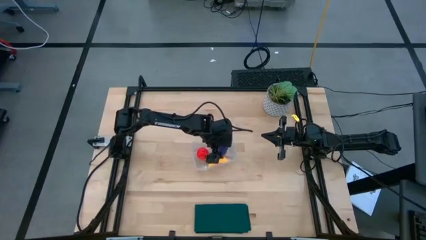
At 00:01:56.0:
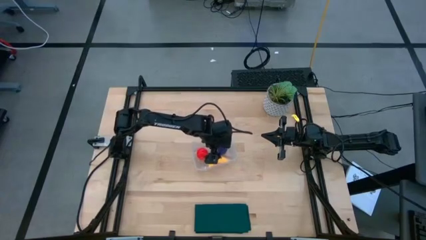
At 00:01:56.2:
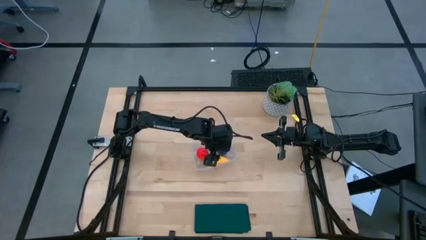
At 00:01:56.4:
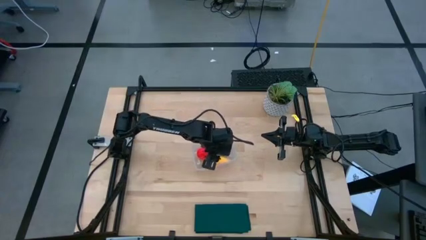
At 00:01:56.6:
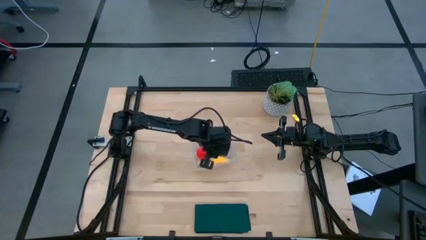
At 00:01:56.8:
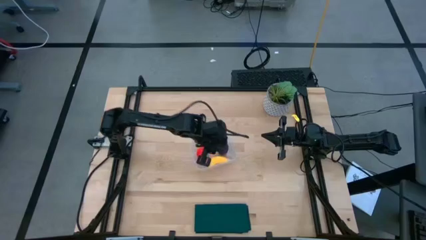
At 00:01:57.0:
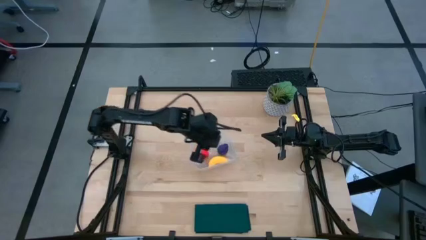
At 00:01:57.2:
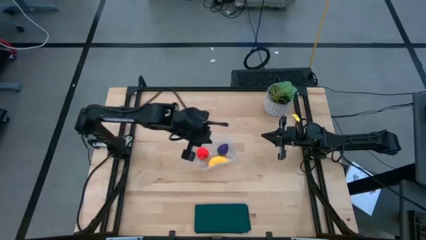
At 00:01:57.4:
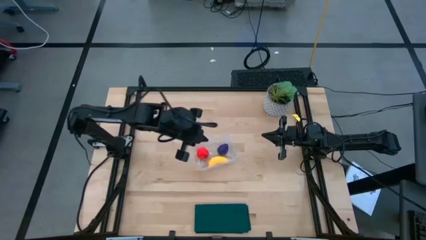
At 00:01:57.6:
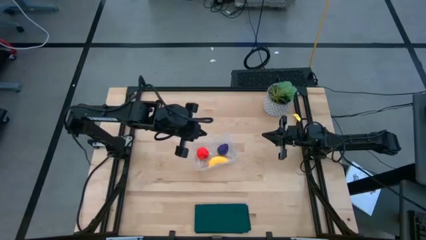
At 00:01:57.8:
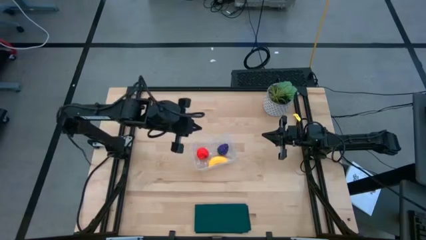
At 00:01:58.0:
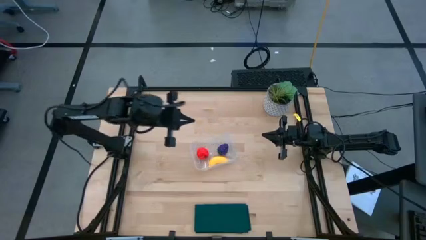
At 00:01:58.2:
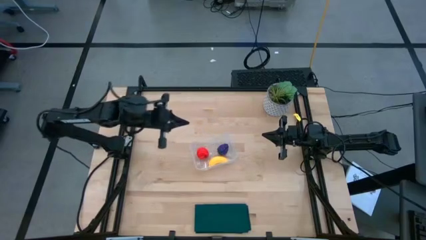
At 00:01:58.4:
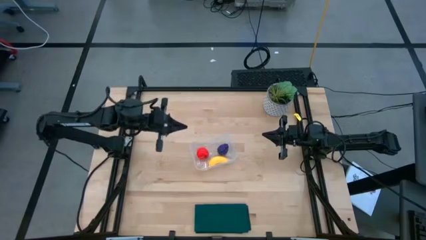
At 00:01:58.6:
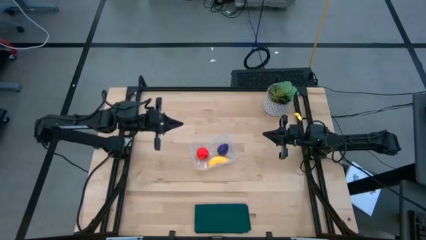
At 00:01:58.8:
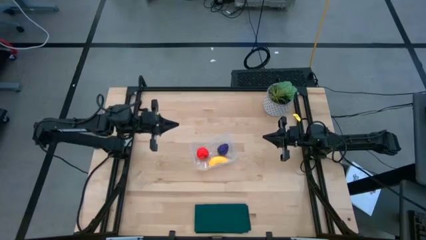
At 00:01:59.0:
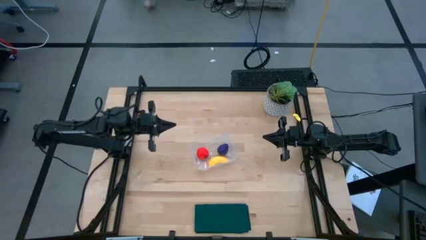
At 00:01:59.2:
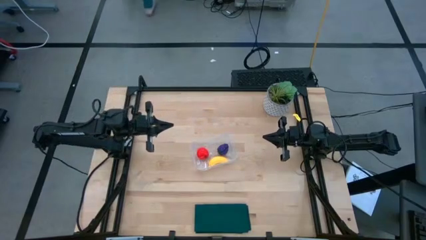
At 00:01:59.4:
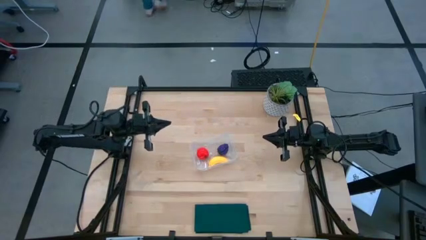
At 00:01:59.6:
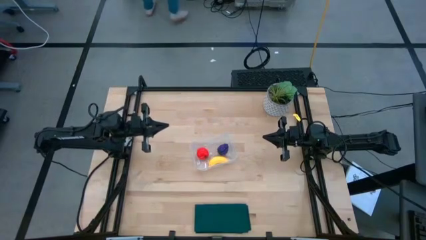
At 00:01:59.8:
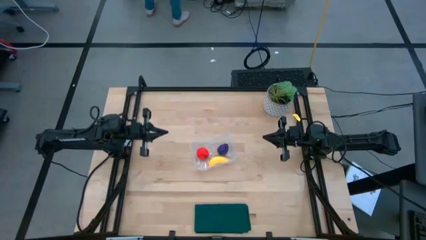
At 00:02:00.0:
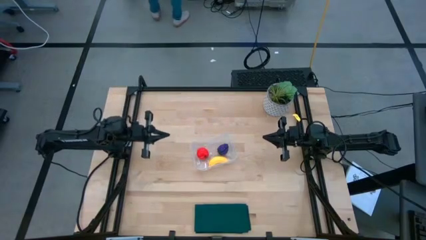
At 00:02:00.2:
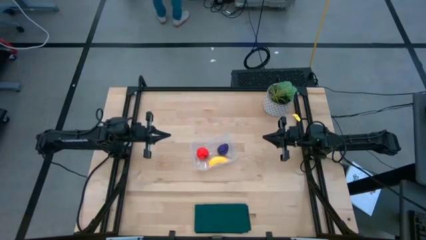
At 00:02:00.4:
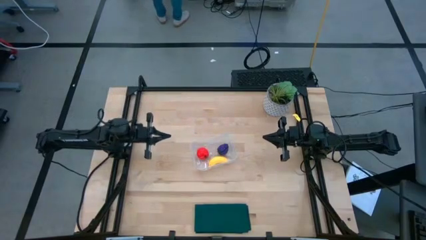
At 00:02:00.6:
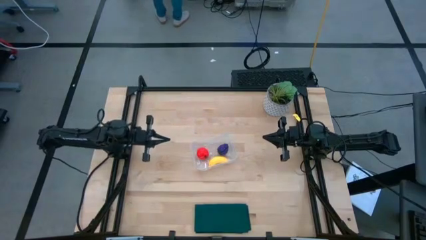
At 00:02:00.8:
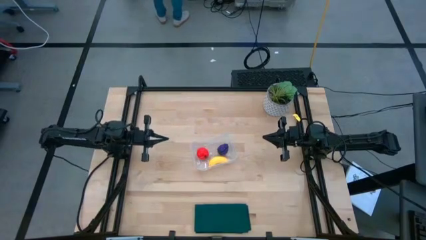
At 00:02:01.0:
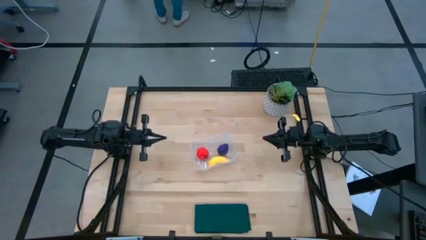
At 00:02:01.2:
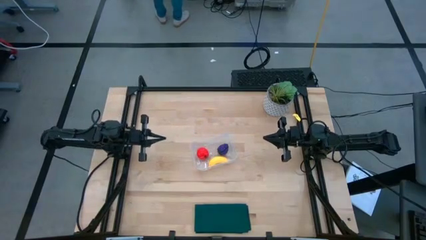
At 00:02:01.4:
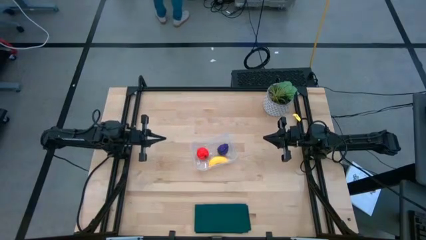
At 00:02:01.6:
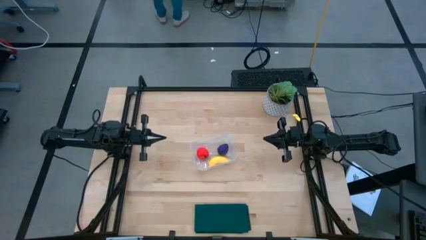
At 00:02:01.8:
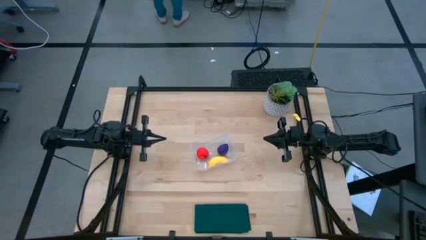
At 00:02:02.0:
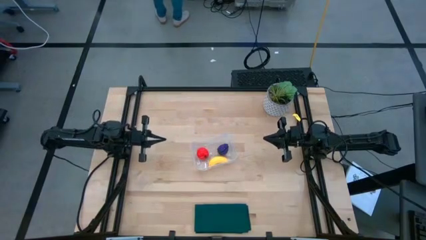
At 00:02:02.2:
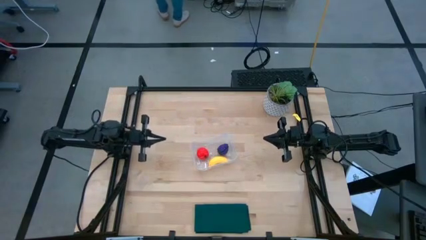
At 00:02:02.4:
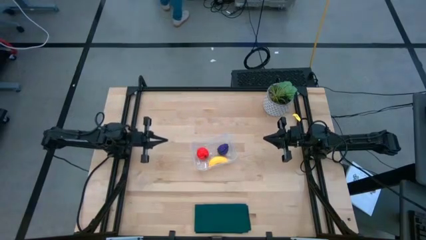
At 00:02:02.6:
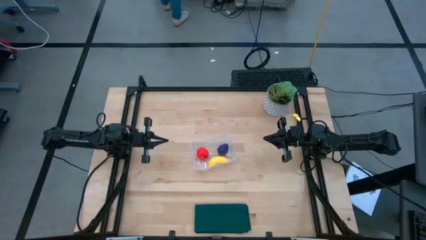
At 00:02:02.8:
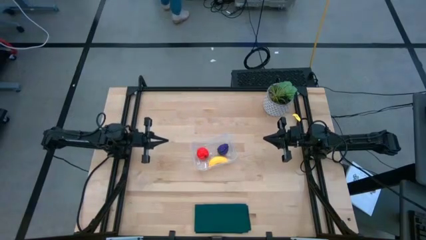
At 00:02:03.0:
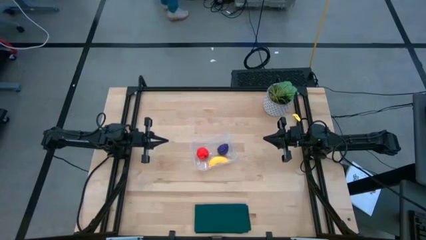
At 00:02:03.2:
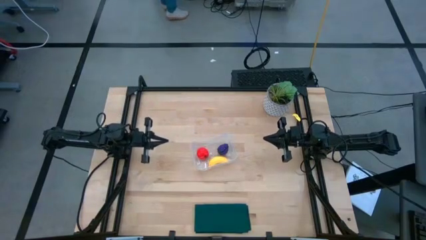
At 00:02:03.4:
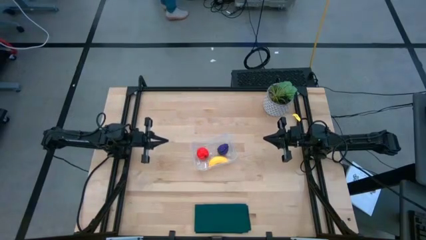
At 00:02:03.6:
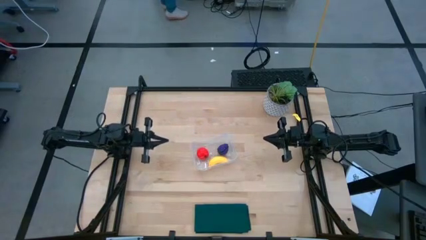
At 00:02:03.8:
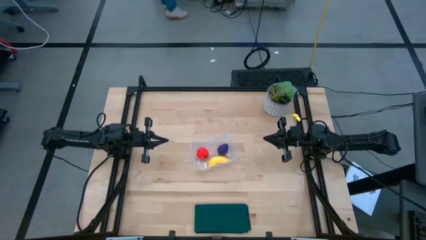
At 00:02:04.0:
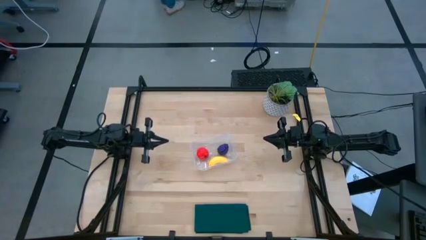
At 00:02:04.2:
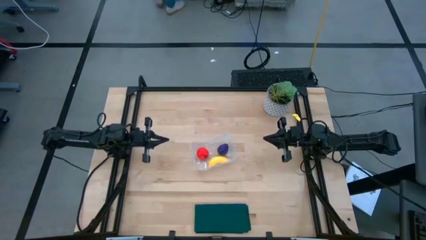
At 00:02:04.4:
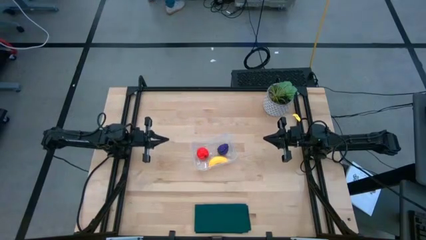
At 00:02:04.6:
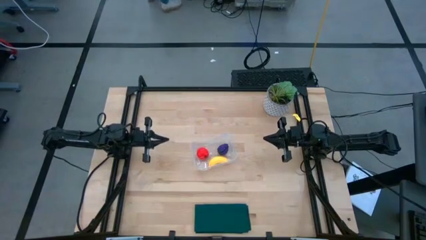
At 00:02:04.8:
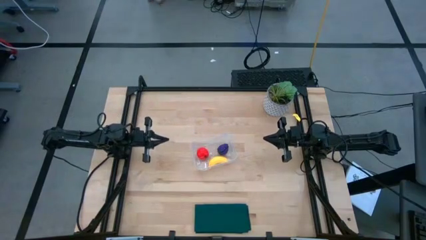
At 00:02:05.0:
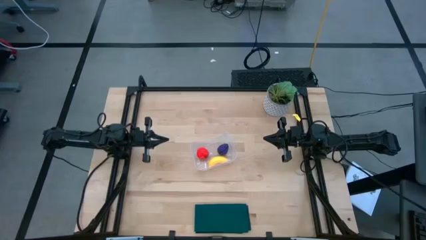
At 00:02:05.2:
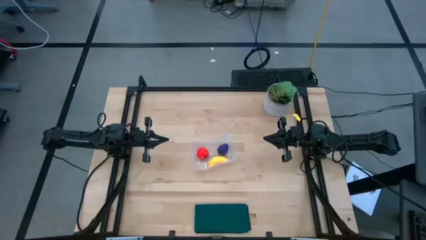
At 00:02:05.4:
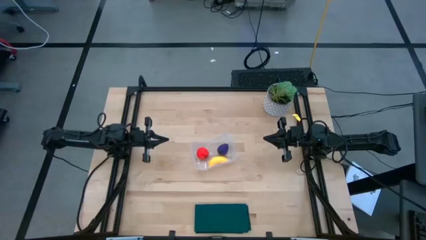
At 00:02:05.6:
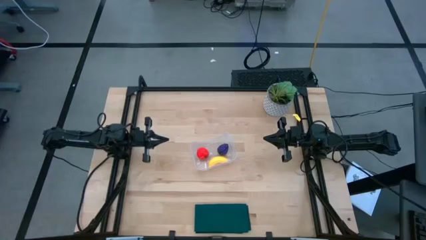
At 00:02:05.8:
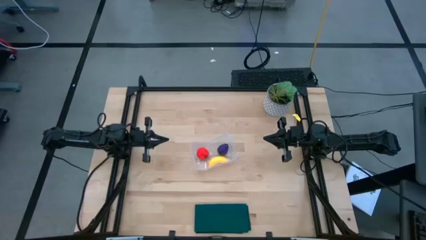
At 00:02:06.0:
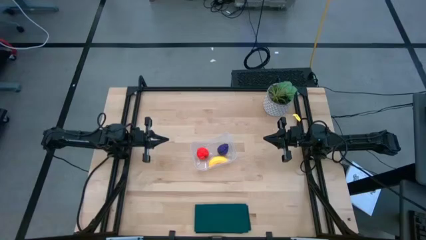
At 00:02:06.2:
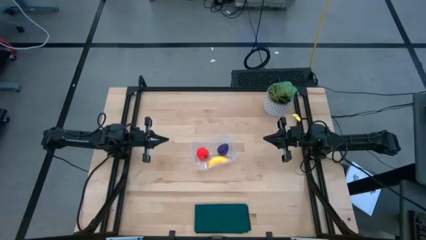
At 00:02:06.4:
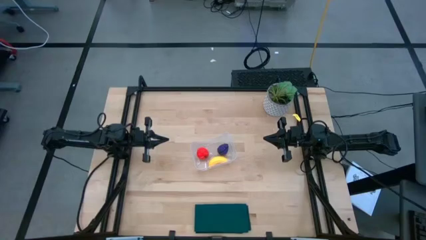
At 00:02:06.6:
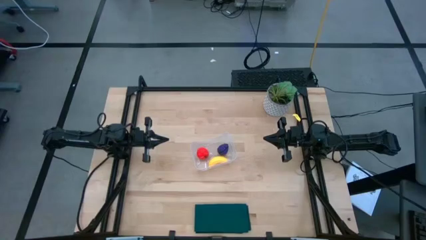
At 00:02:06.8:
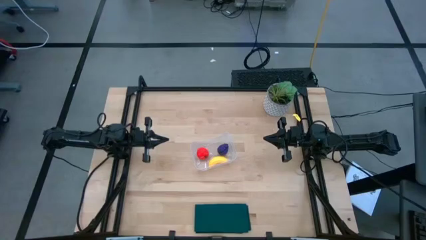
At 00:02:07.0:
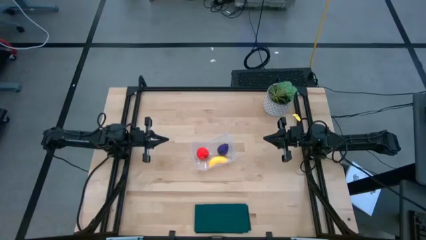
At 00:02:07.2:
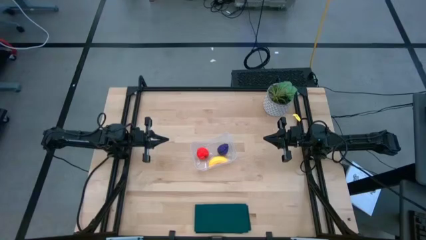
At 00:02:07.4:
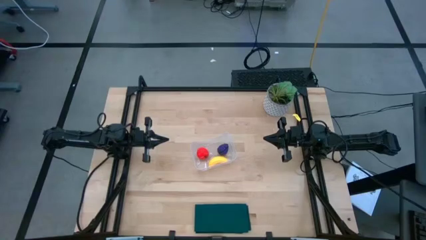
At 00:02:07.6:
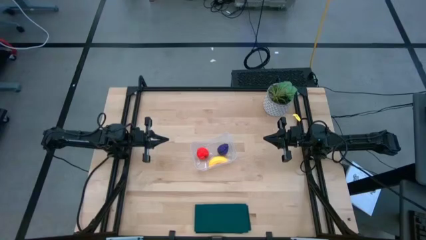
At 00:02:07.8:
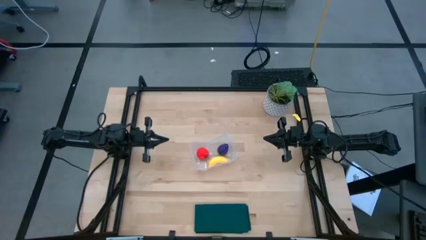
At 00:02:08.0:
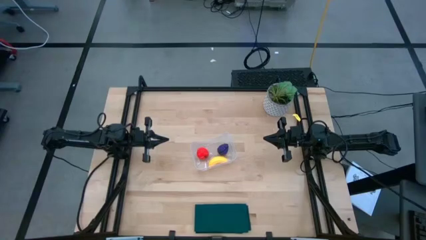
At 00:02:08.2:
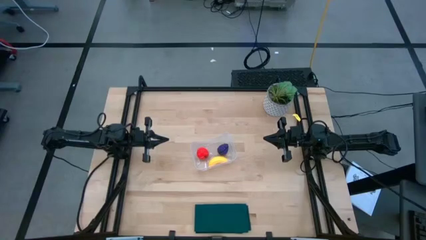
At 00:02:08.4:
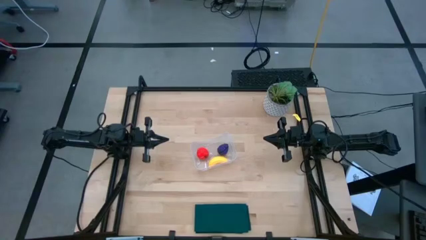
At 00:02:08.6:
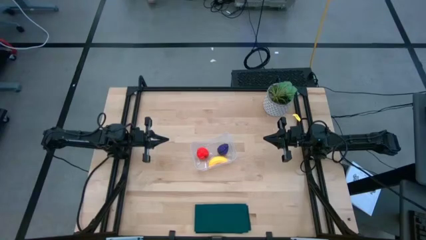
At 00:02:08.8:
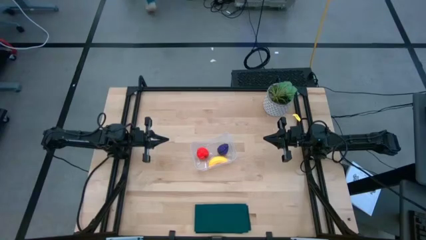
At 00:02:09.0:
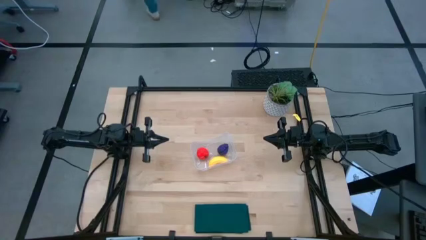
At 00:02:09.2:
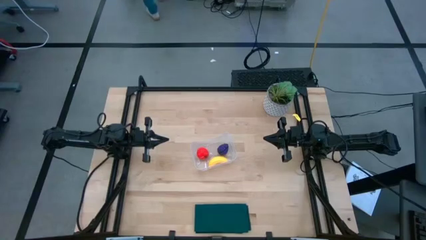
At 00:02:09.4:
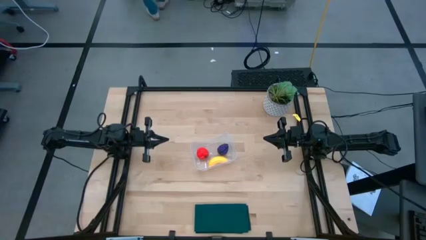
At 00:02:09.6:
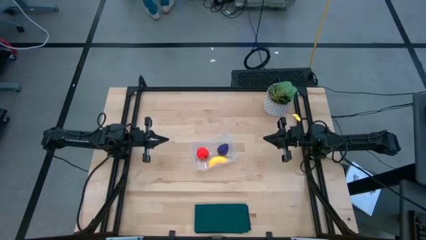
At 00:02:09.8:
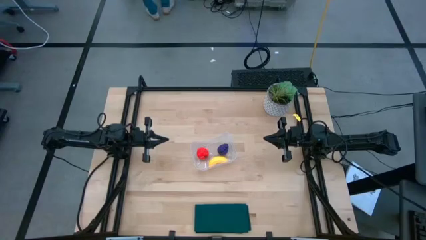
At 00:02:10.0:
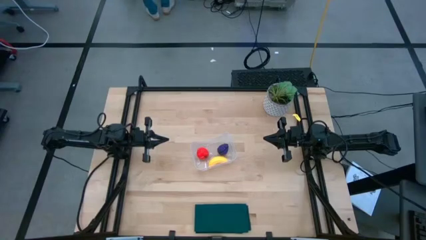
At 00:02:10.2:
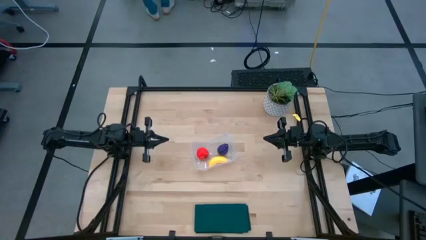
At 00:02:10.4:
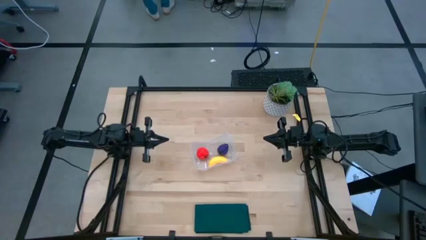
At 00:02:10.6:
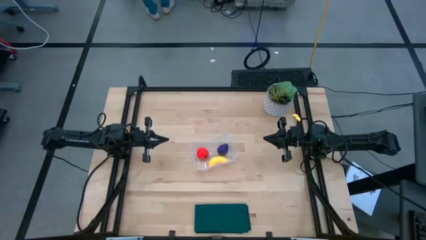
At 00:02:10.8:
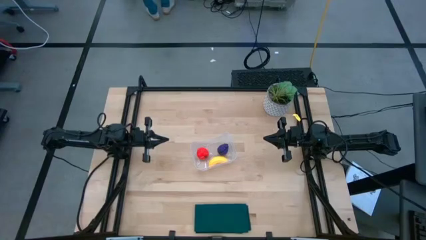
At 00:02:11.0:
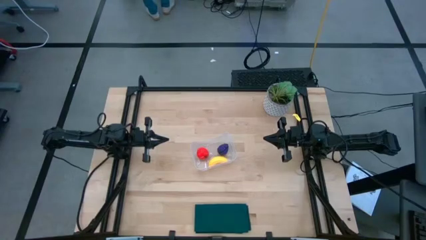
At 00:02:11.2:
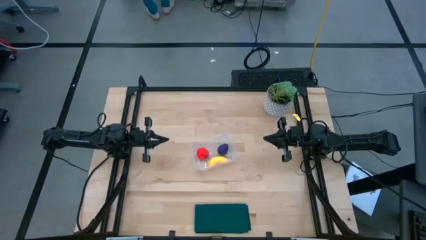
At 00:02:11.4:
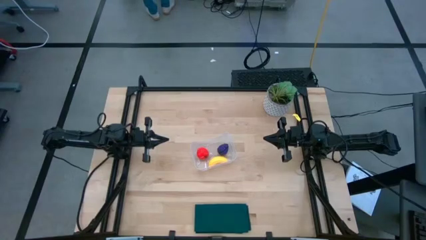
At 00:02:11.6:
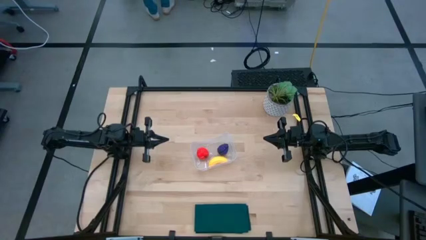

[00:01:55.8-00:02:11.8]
Task: Pick and placing Produce into tupperware
Return to Home Position
